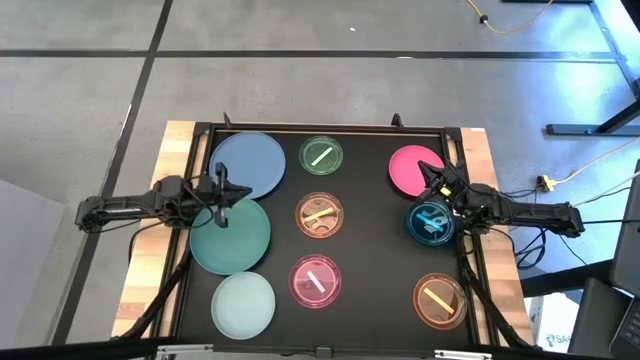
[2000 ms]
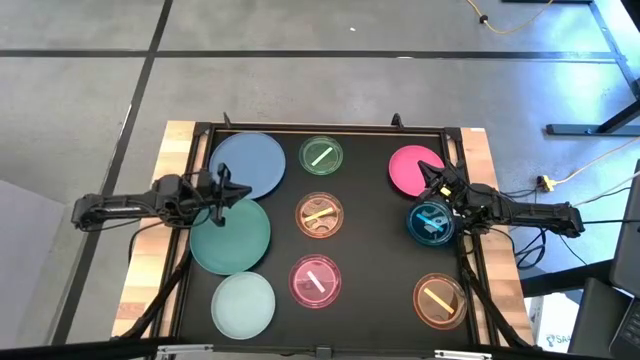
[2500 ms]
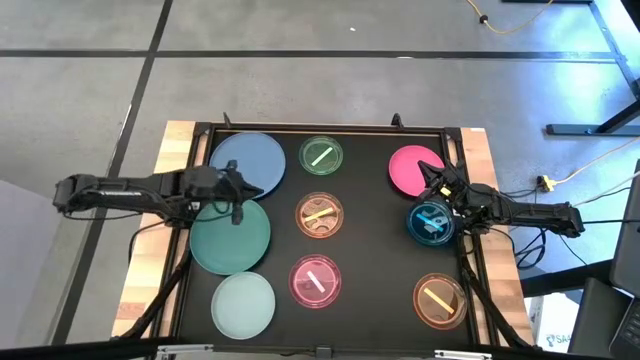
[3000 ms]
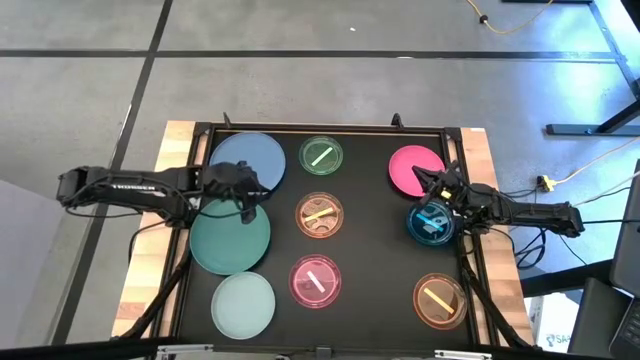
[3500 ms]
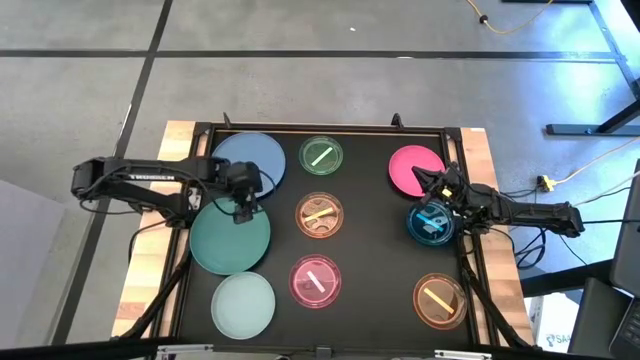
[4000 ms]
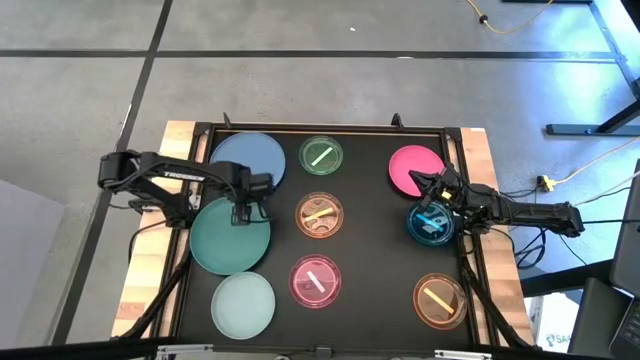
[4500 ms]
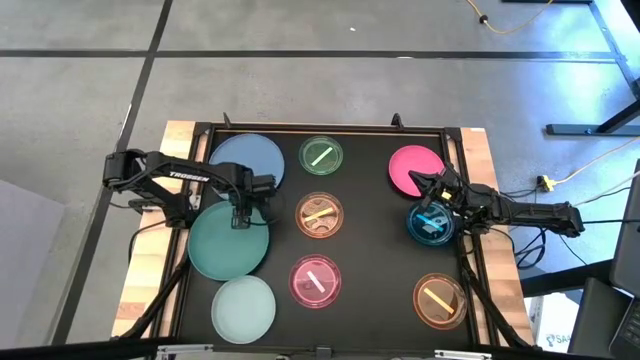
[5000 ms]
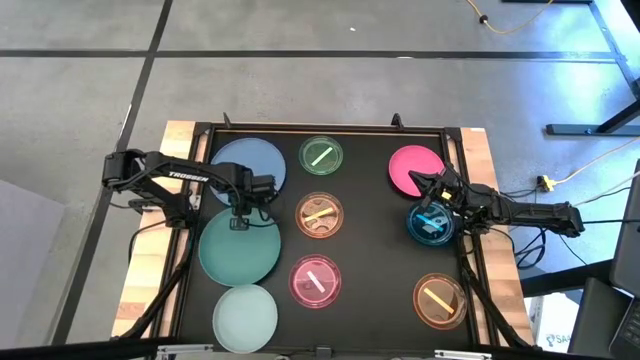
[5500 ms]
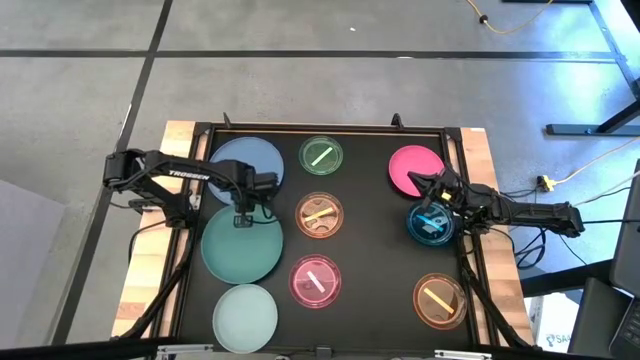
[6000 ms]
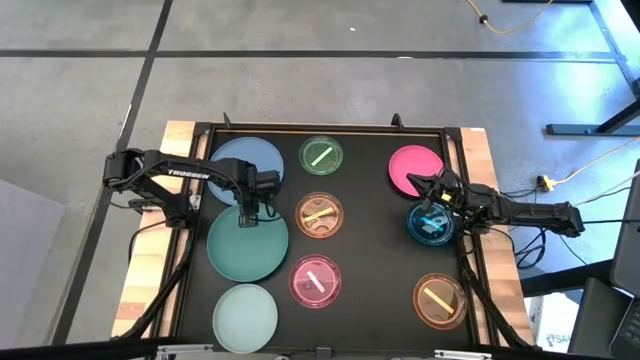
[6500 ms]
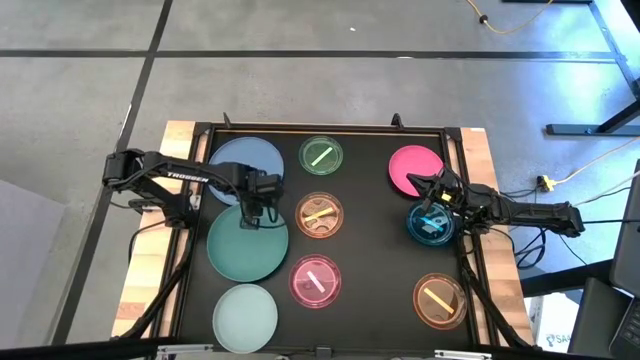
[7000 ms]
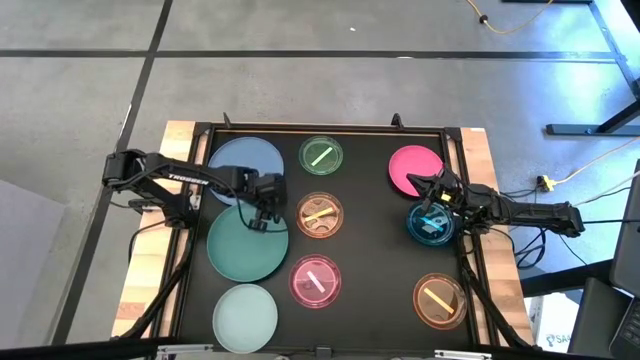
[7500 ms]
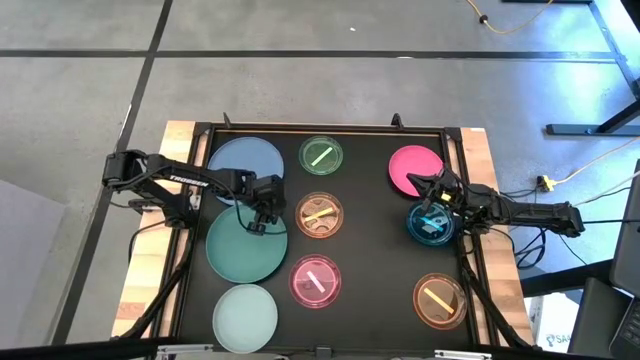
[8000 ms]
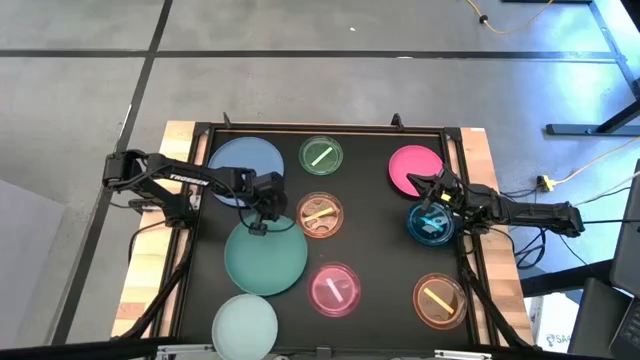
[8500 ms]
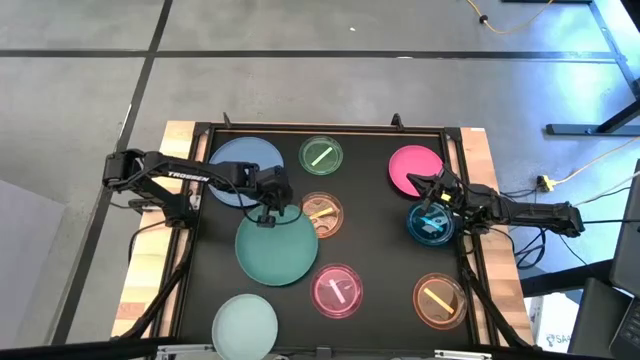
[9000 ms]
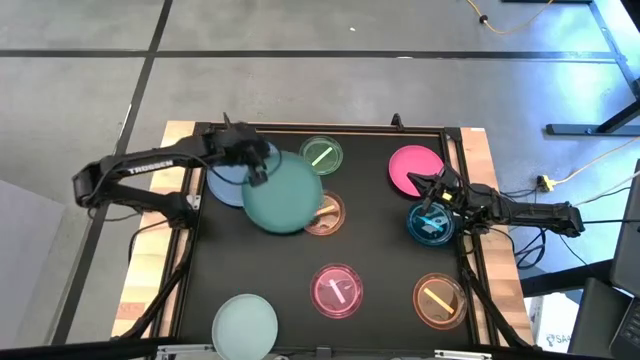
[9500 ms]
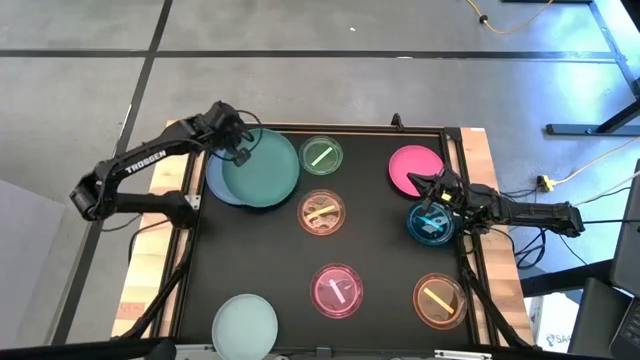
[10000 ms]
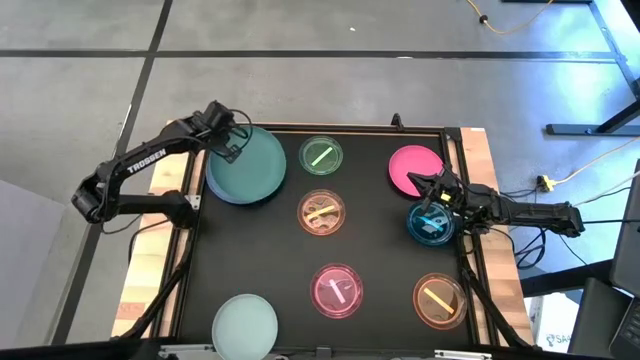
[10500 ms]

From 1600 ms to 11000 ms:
Task: Stack plastic plates
Stack the green plate on top of the blue plate on the table

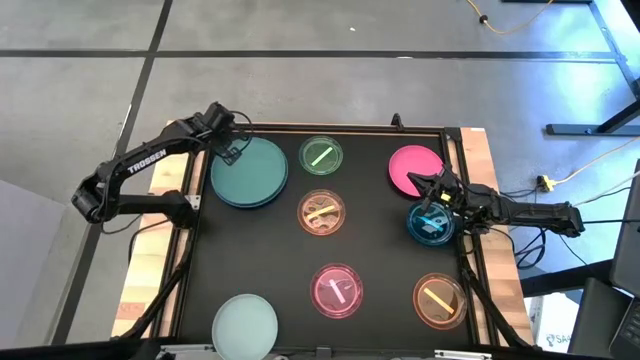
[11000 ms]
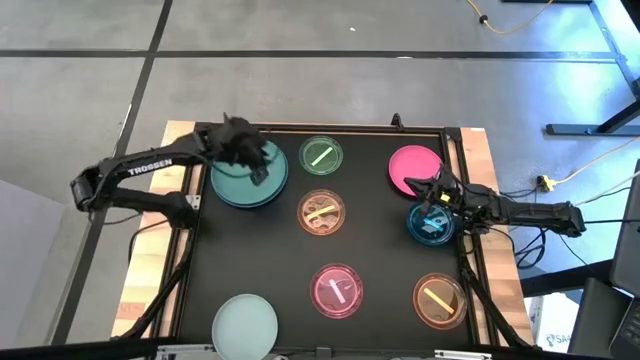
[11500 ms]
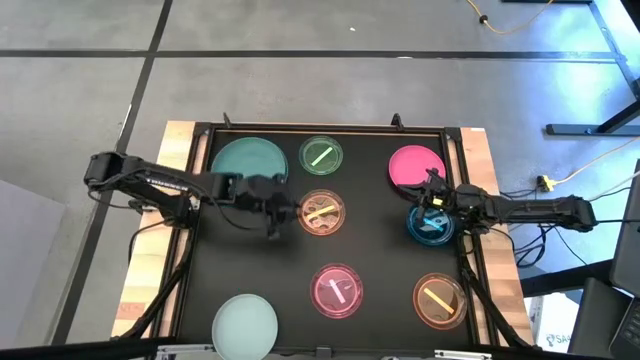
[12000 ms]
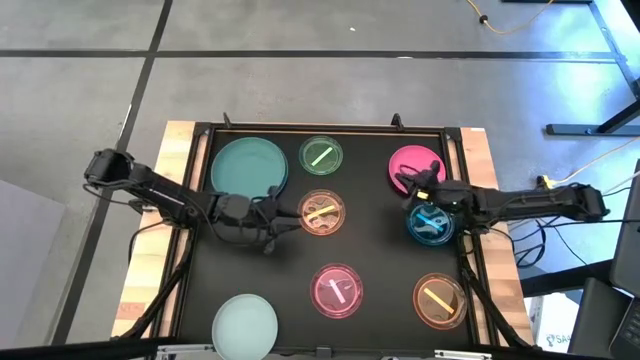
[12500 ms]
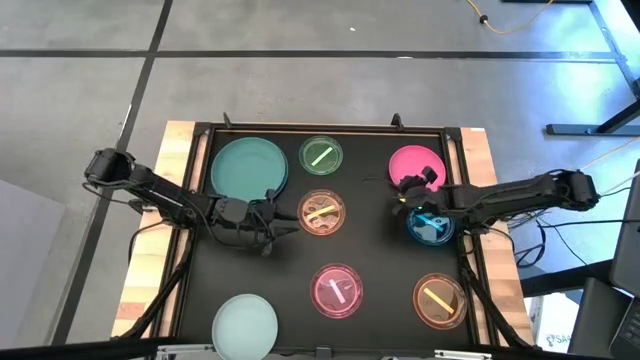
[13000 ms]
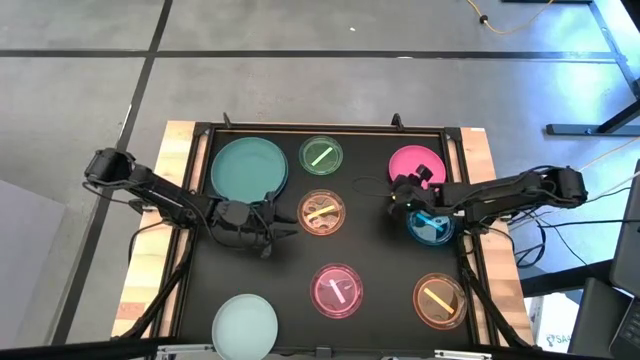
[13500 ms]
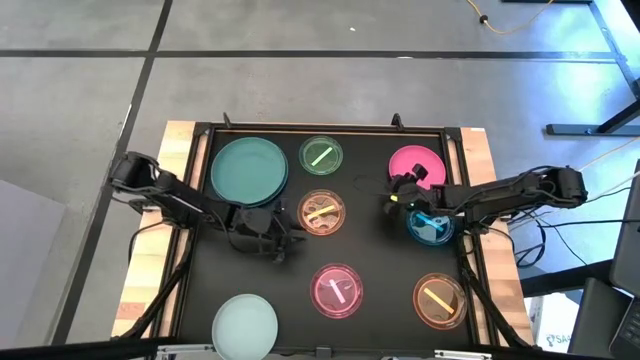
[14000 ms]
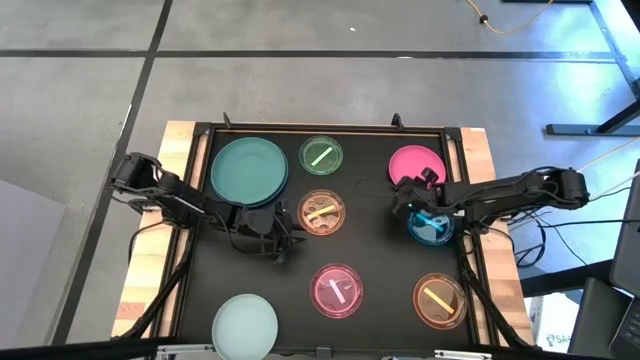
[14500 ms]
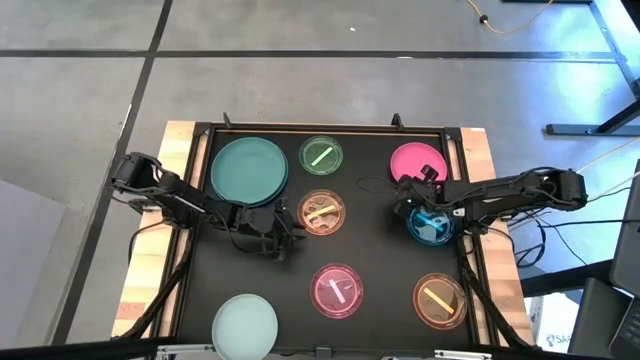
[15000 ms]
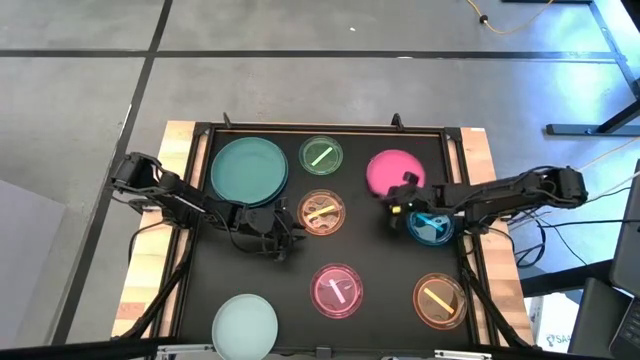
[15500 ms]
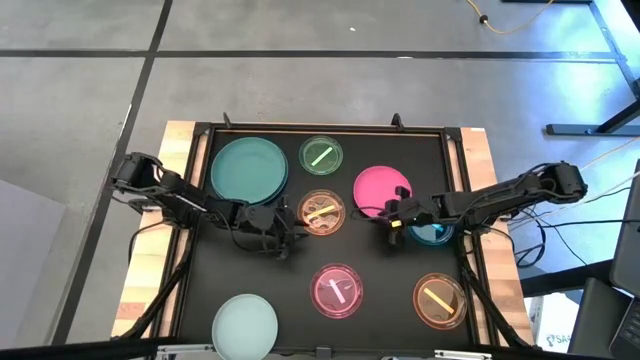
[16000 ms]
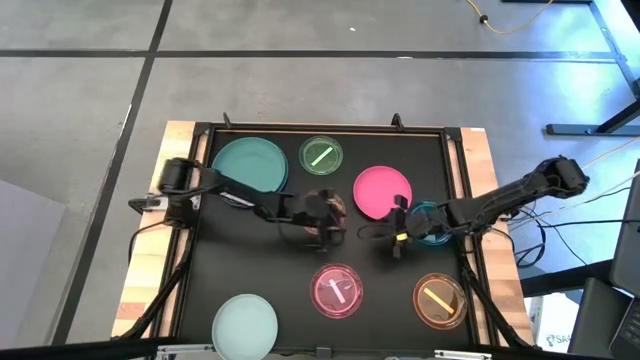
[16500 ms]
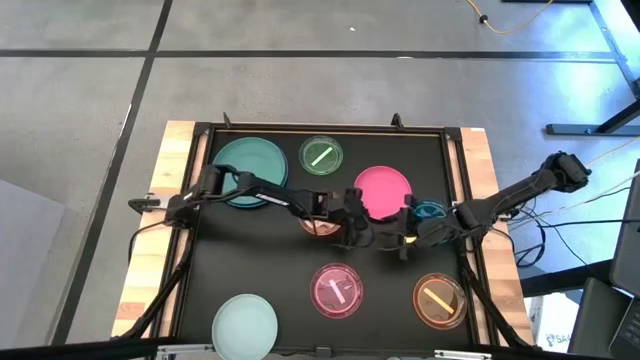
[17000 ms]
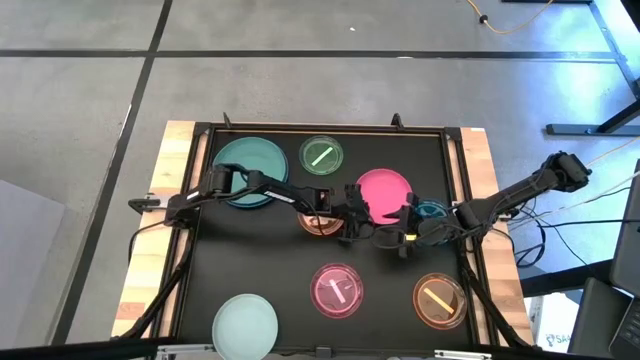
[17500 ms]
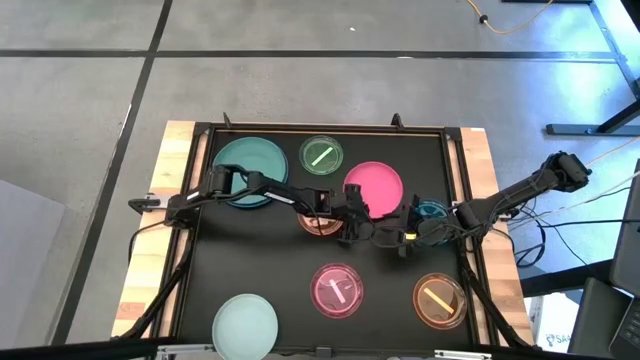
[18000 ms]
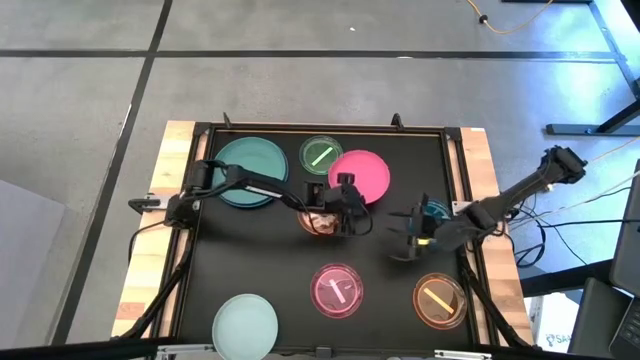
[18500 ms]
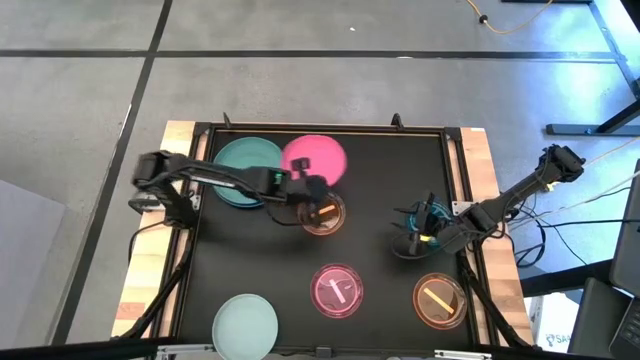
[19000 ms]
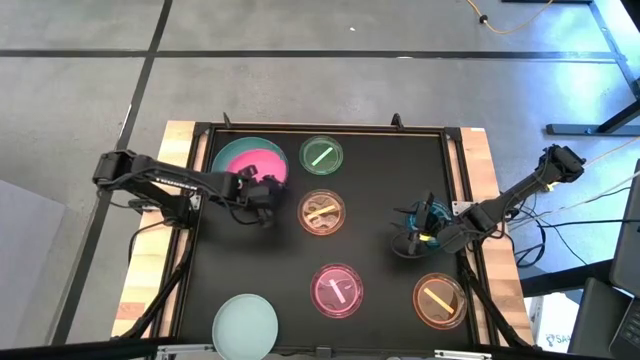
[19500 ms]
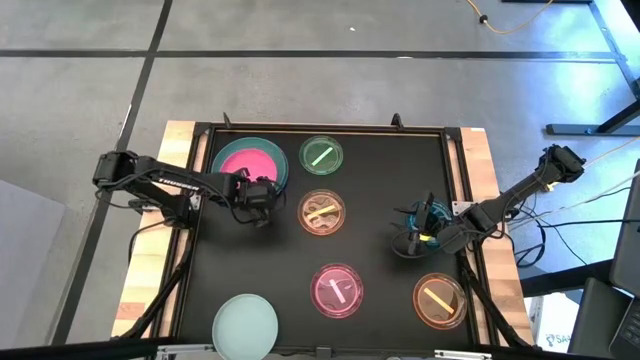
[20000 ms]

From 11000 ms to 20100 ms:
Stack the pink plate on top of the green plate on the table

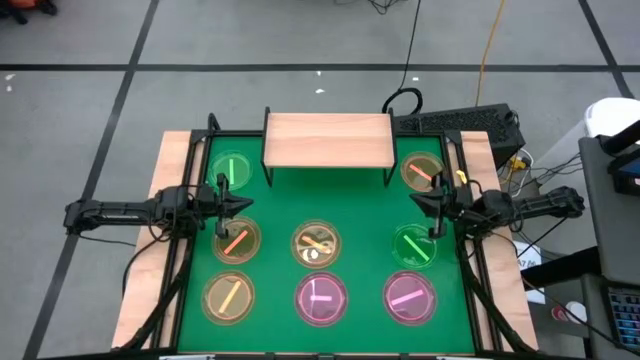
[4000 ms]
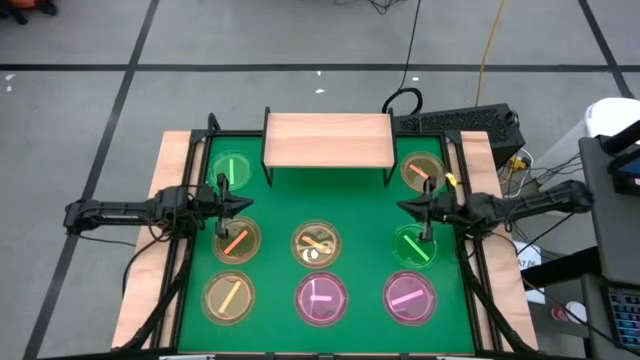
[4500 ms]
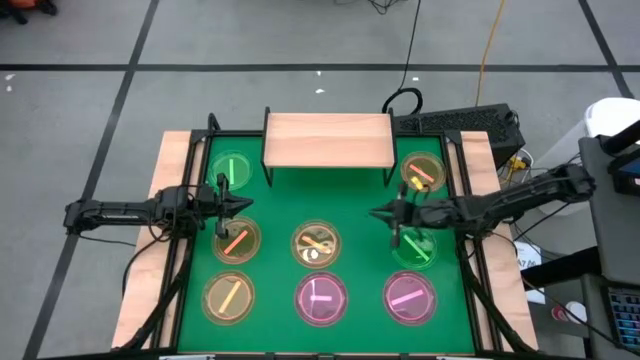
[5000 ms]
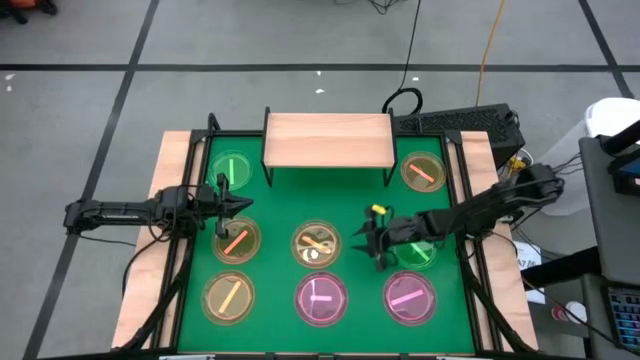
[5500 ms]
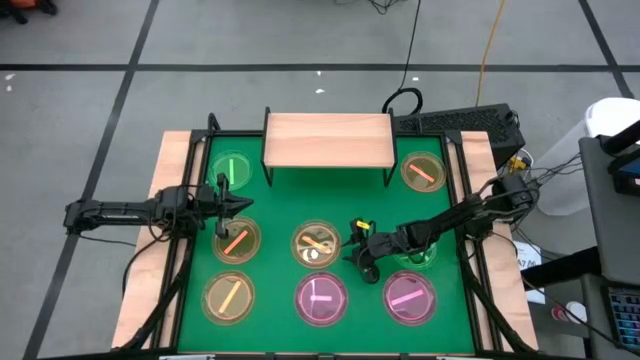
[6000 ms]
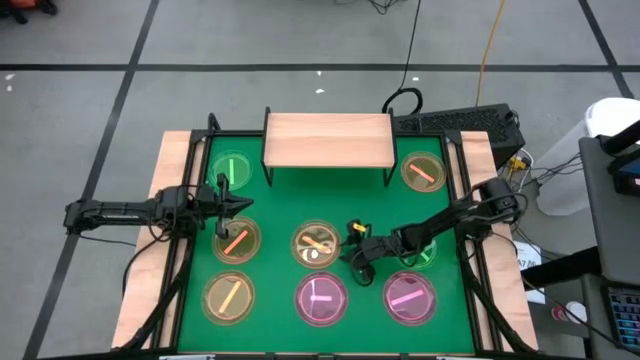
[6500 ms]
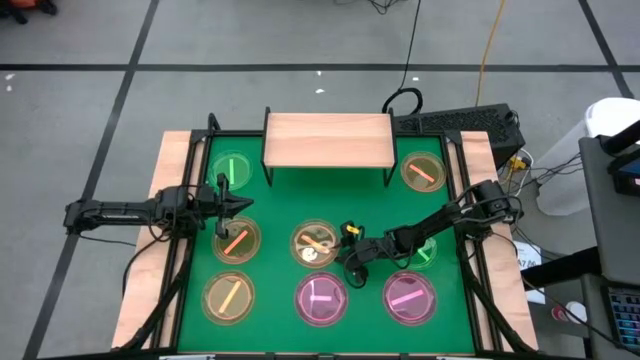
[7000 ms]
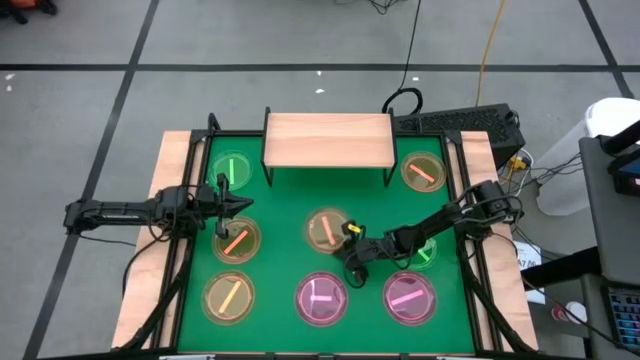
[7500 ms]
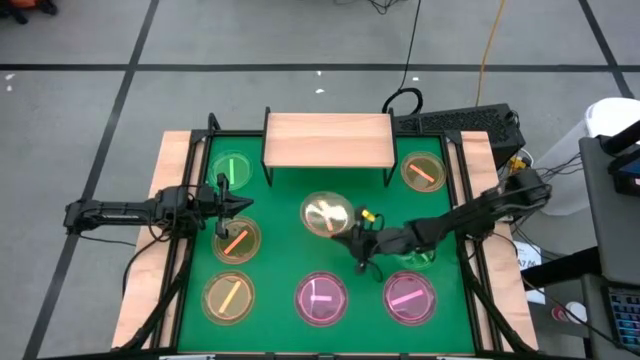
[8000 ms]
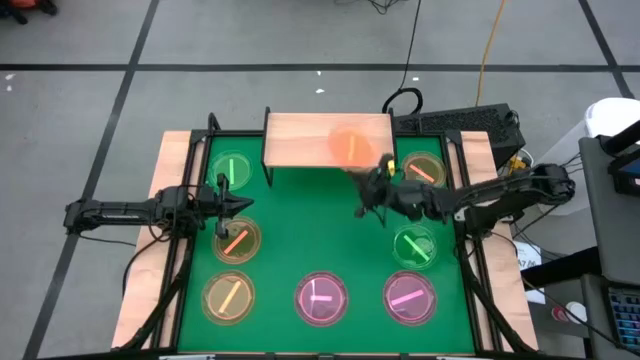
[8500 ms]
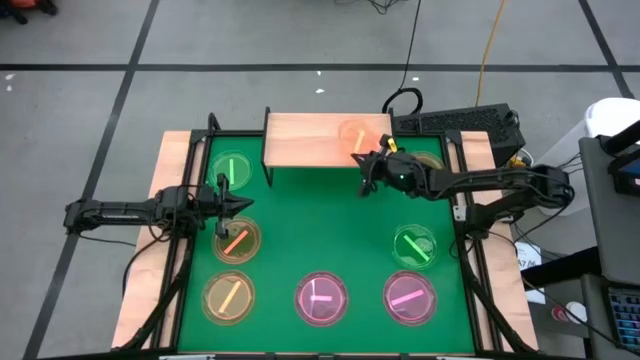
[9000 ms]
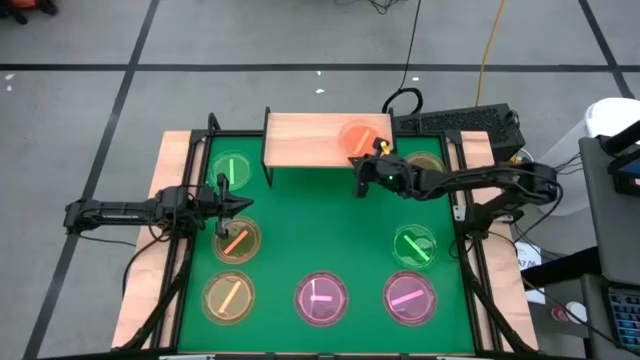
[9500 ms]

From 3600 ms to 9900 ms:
Task: Place and stack plates onto a shelf
Put the orange plate on the shelf
